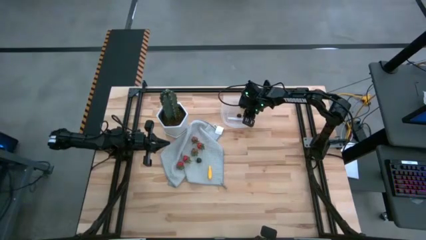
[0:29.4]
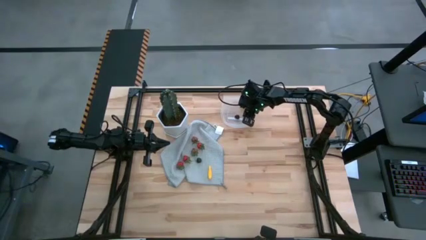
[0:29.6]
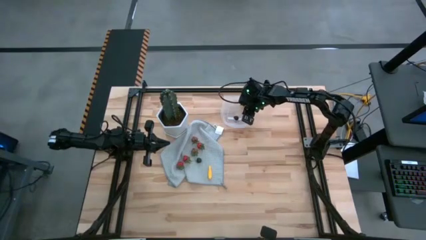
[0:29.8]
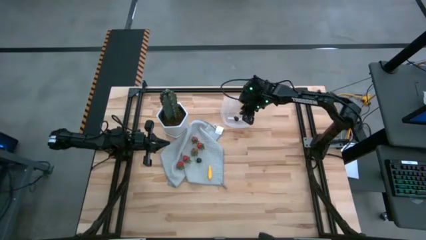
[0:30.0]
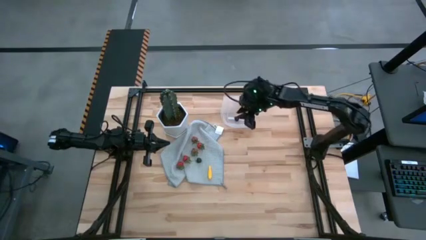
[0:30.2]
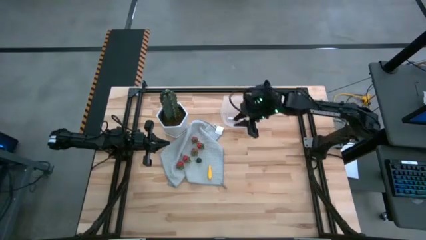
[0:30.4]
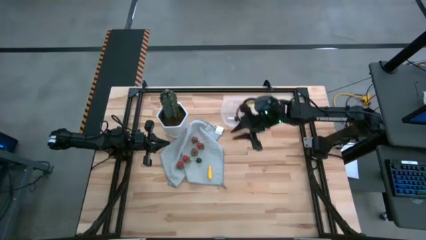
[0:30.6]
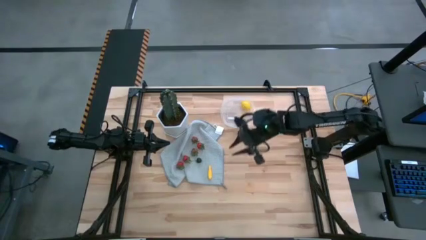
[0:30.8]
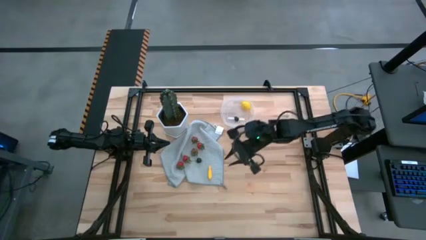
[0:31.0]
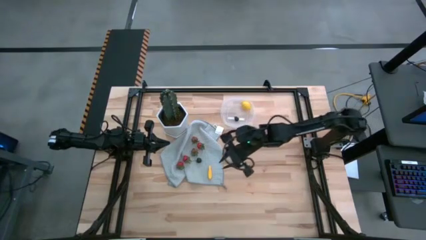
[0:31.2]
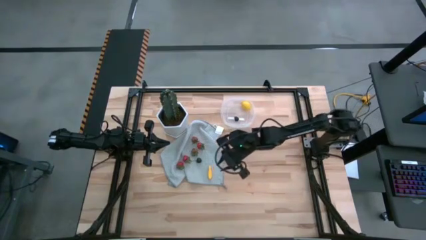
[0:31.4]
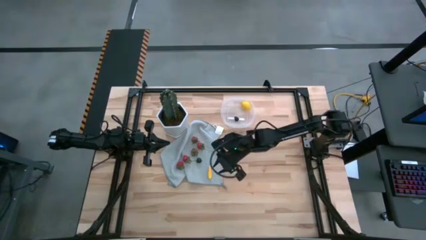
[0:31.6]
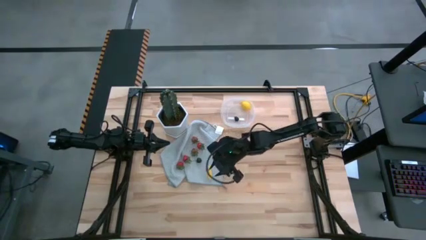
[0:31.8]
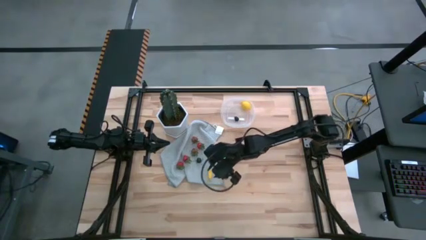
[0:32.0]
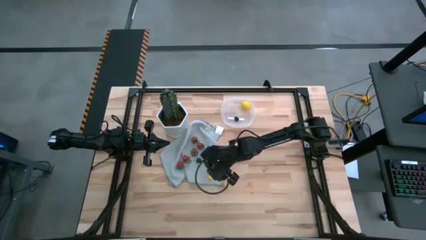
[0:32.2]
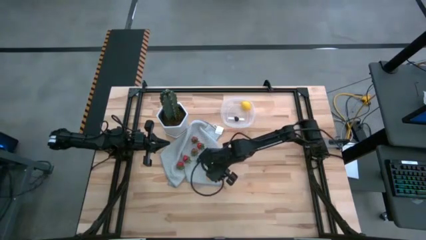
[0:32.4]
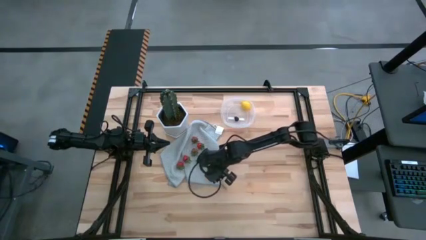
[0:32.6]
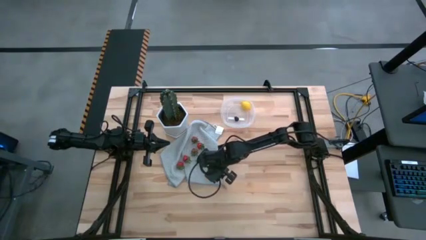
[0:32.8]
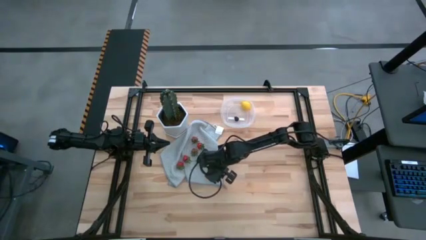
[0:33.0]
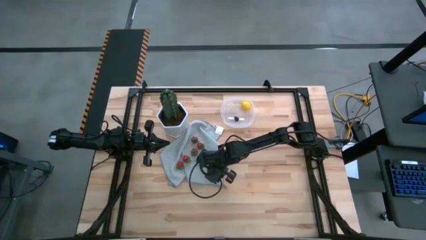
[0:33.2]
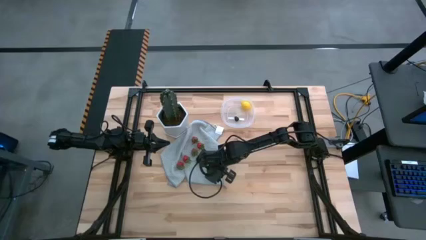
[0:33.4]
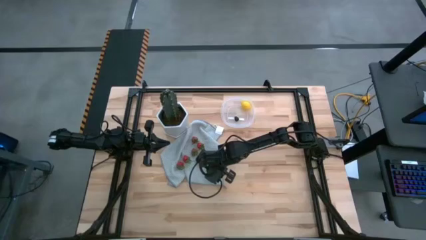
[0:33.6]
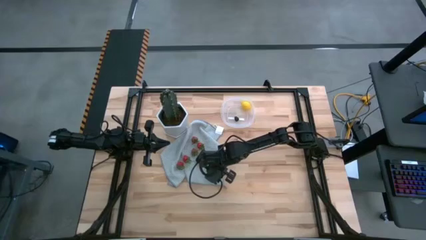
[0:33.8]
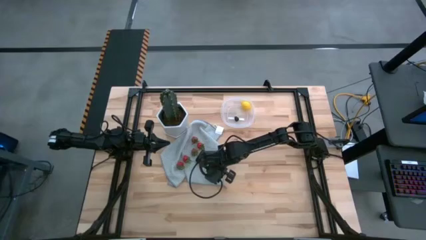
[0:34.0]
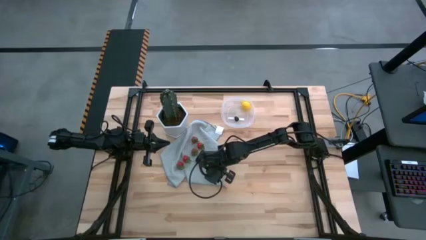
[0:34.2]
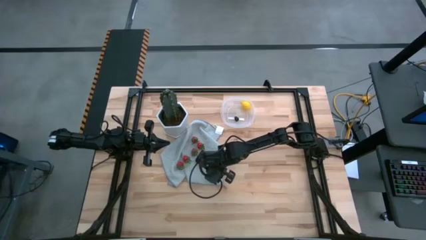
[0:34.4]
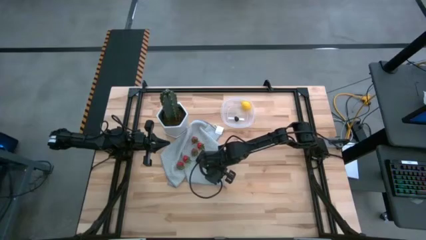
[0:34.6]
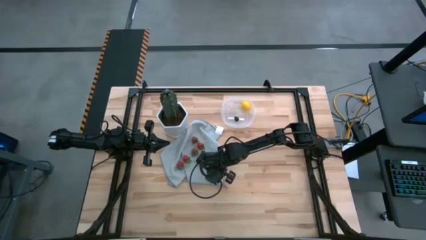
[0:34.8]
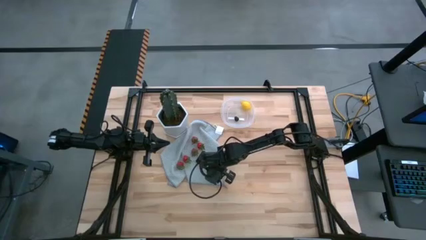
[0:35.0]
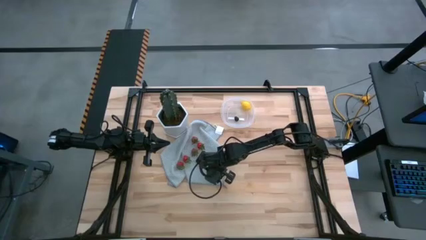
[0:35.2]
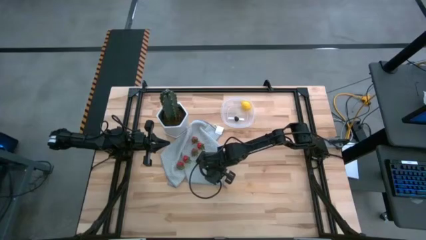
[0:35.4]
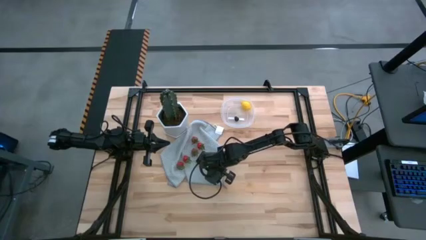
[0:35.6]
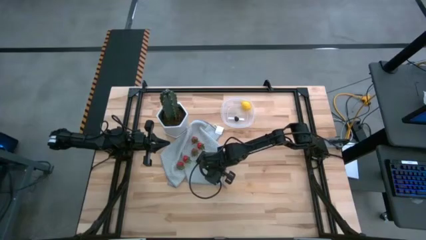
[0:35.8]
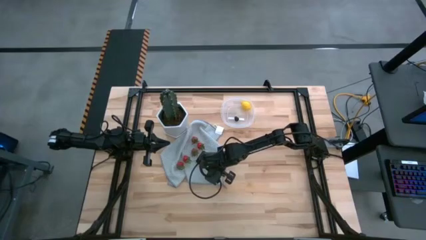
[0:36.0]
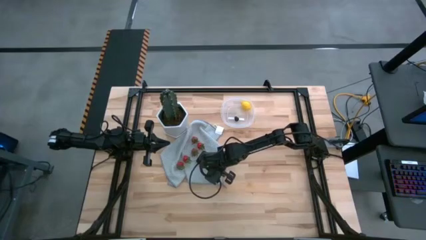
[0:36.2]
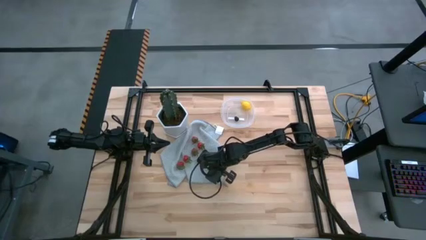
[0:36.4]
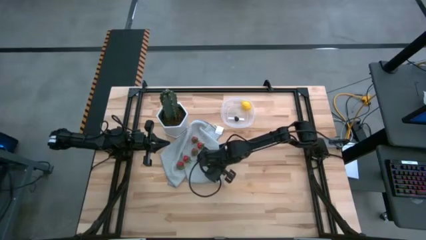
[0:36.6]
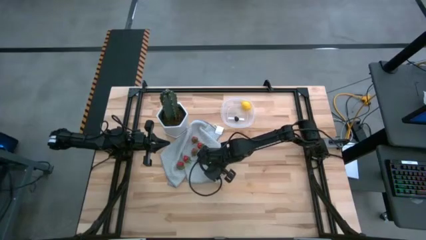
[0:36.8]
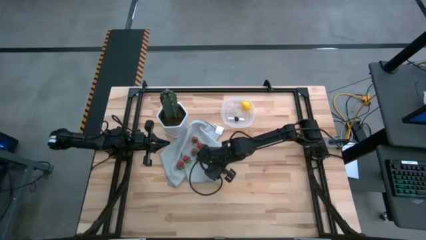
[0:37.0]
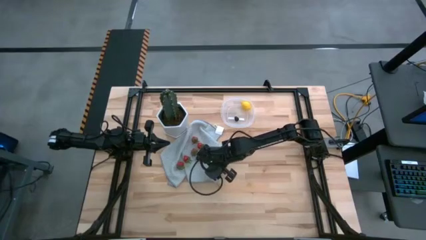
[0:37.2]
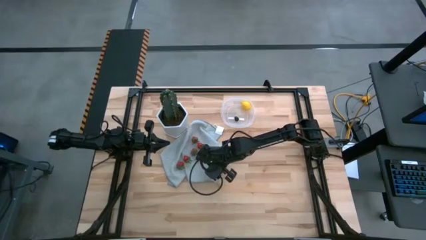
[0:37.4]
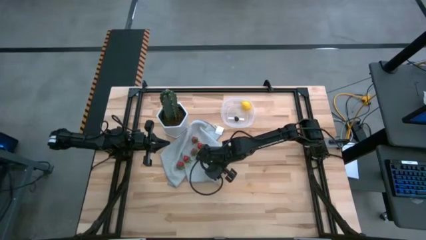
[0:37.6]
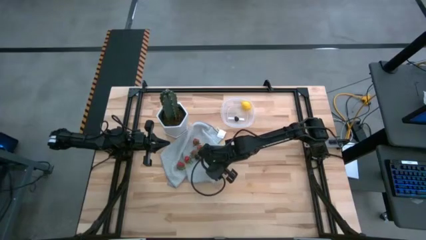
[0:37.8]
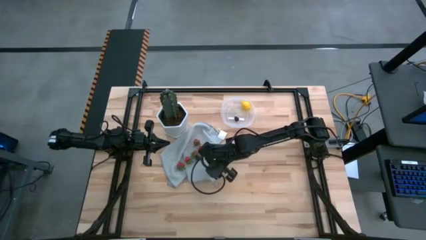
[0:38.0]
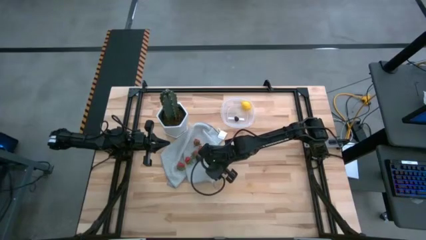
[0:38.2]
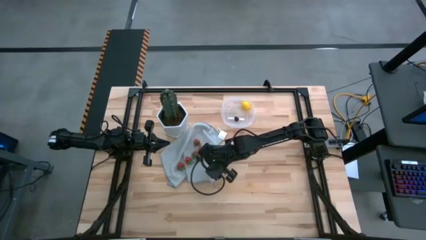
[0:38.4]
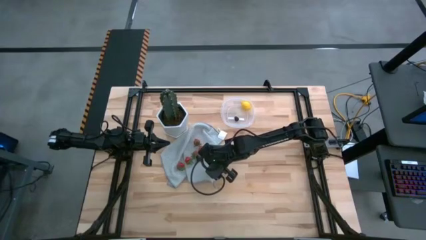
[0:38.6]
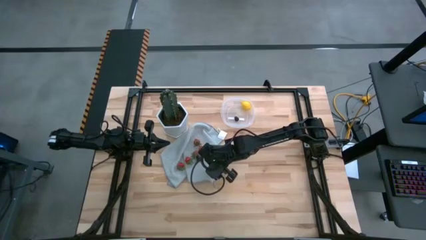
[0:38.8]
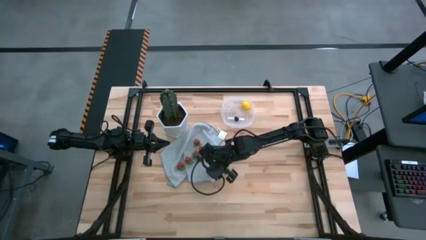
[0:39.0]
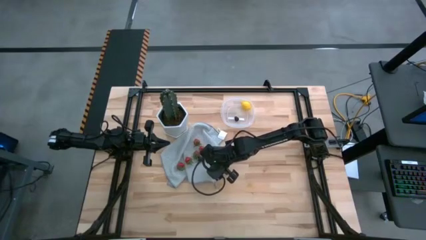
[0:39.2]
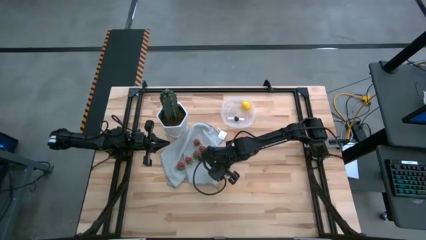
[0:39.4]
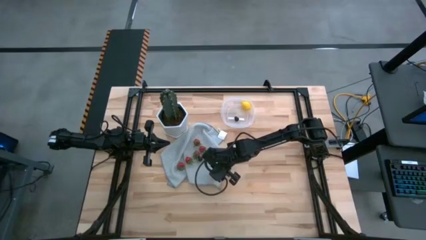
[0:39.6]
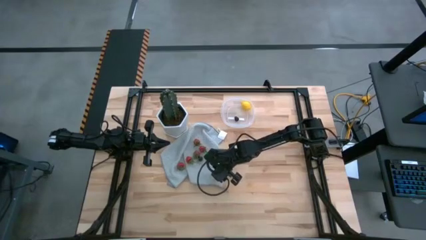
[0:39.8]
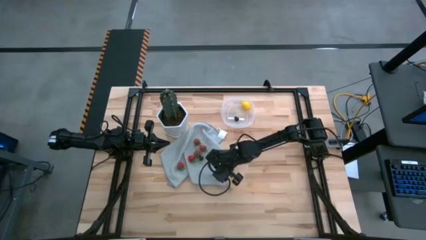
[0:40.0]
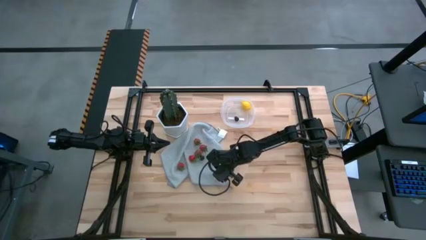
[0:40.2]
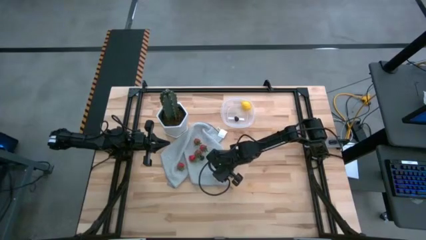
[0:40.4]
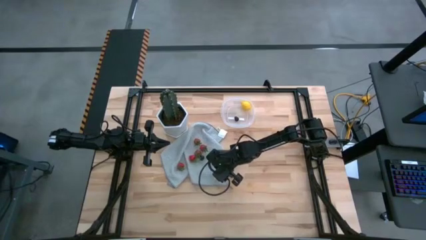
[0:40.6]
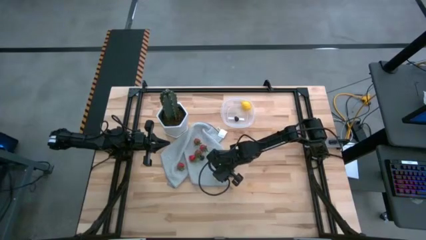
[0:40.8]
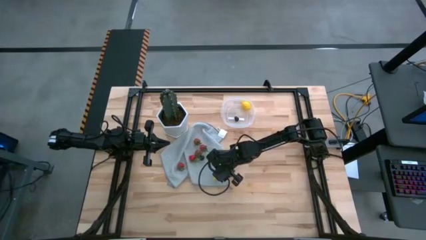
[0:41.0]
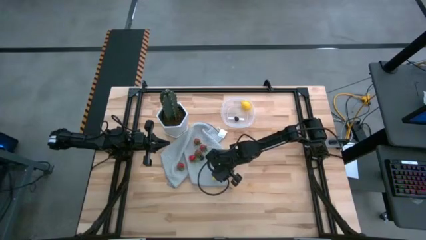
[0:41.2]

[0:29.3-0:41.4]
Task: Pick and placing Produce into tupperware
Put the yellow corn into the transparent bin

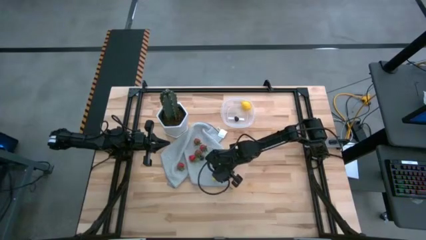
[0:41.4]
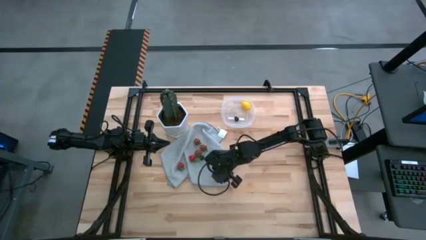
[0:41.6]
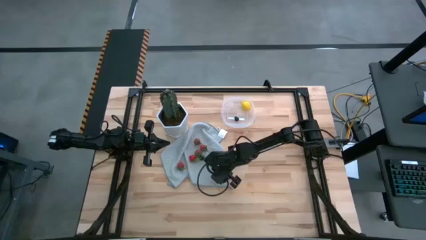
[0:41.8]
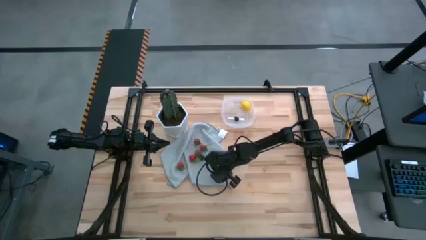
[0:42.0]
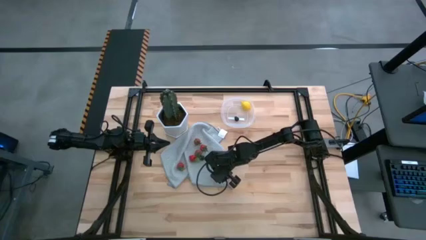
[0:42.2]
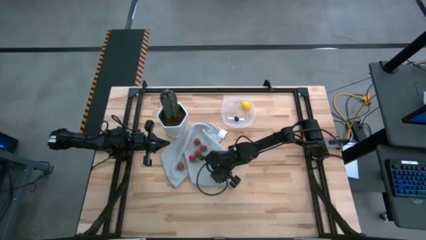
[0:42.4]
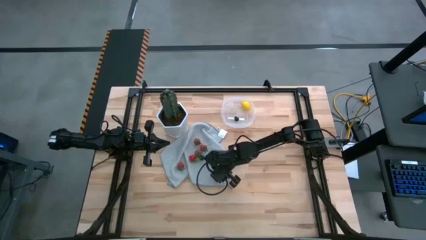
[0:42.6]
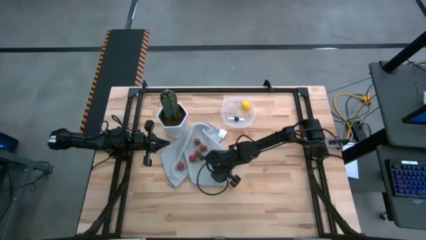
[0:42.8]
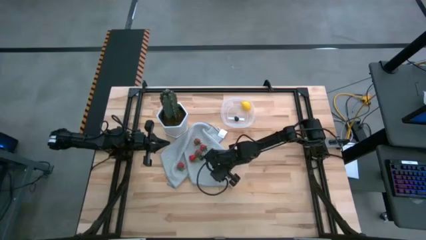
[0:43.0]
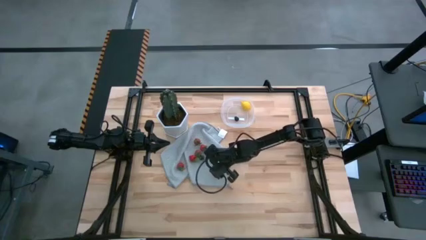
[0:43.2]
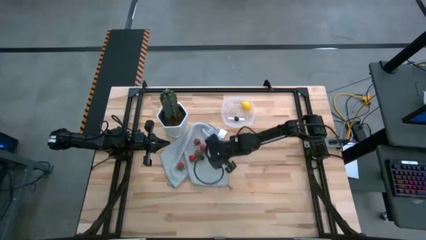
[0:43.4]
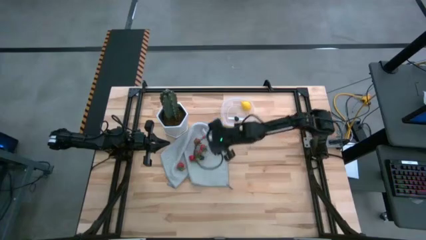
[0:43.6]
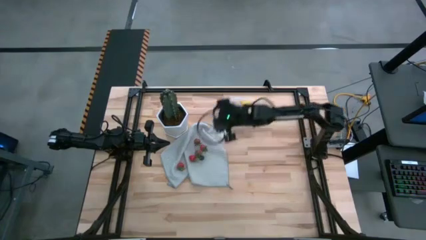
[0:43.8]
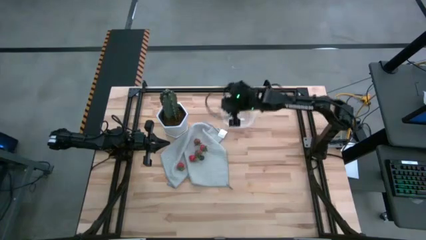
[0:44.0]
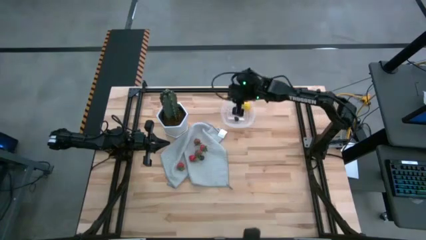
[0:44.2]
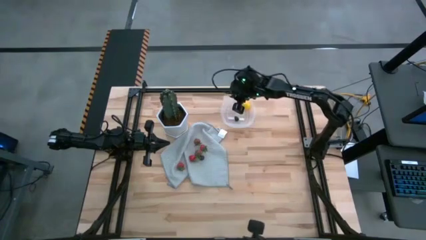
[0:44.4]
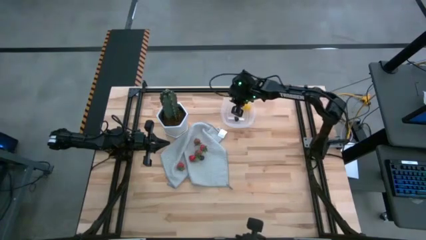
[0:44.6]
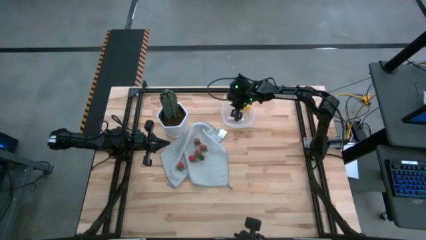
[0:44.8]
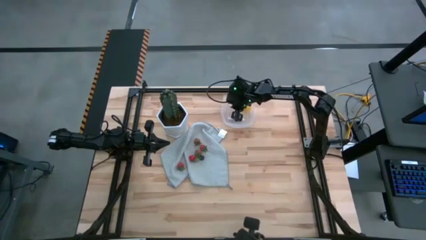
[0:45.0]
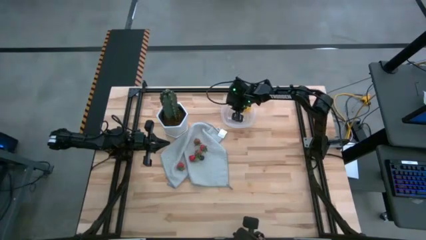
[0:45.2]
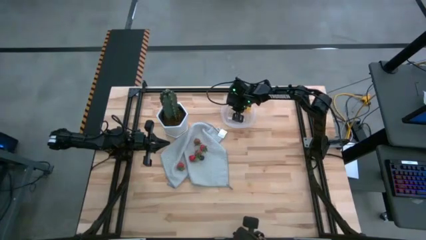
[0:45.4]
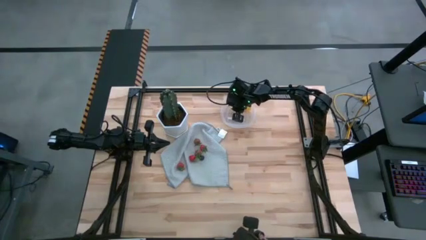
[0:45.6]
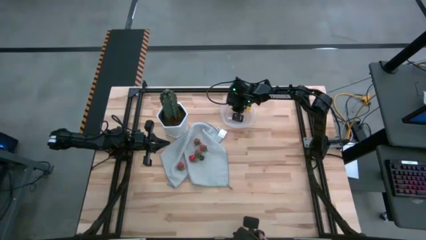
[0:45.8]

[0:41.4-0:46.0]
Put the yellow corn into the transparent bin

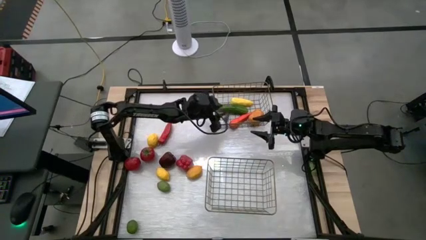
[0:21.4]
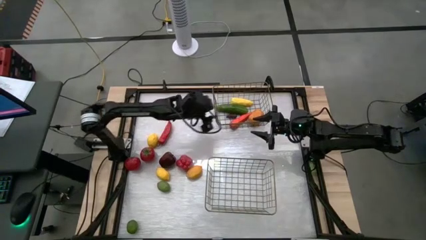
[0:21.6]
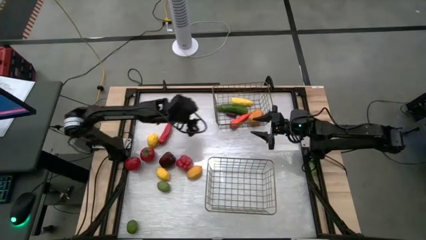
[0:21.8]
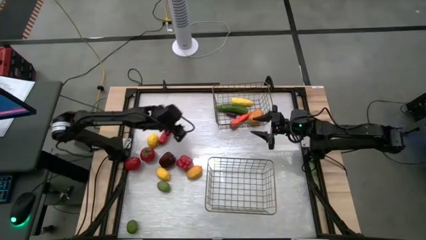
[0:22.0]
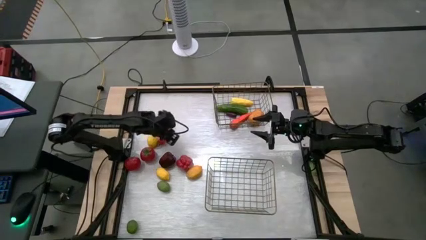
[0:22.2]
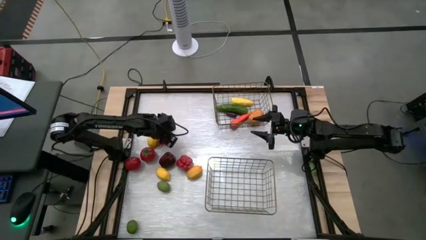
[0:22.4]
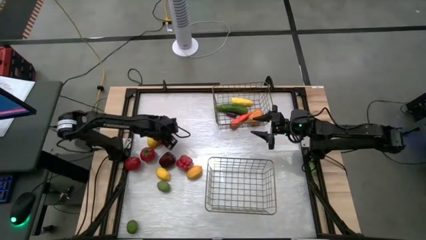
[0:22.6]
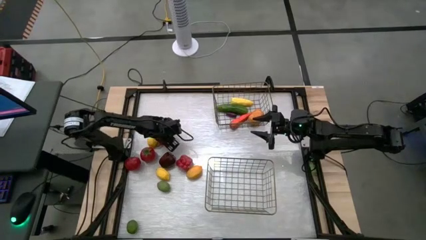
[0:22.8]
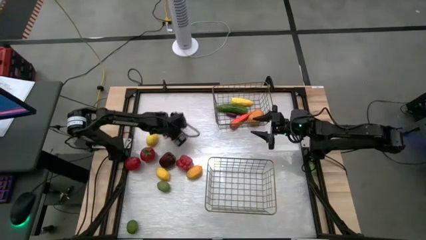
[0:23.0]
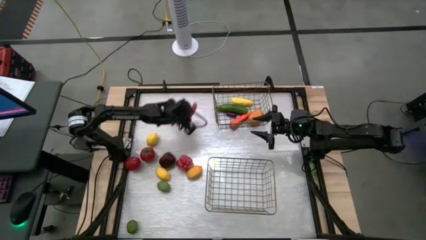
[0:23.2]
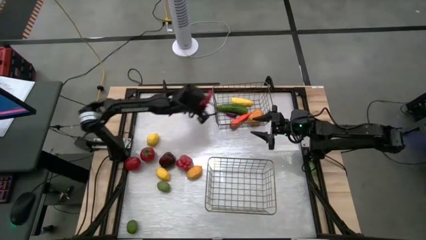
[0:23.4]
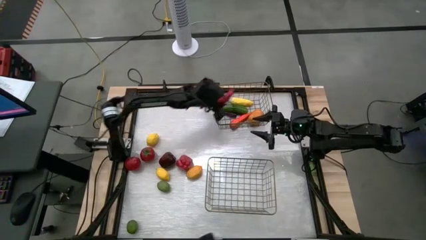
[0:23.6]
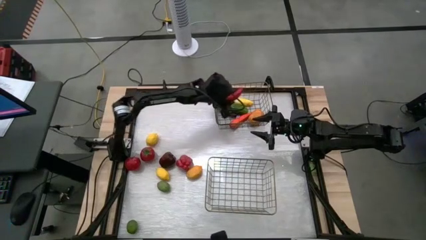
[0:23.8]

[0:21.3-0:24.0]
Task: Sort produce into baskets
Put the red chili pepper into the top wire basket
